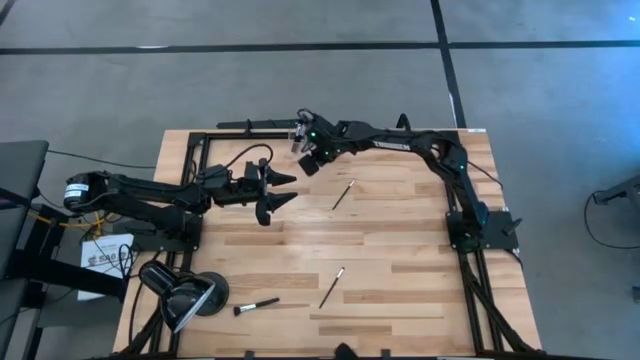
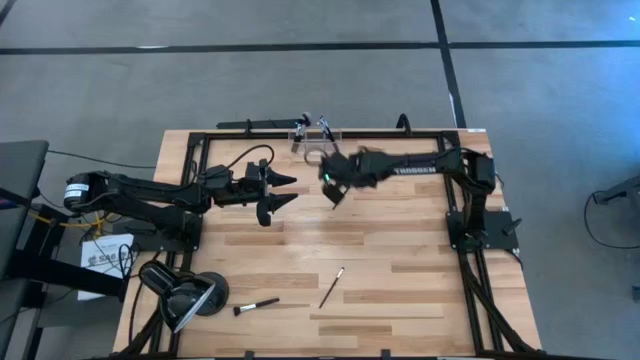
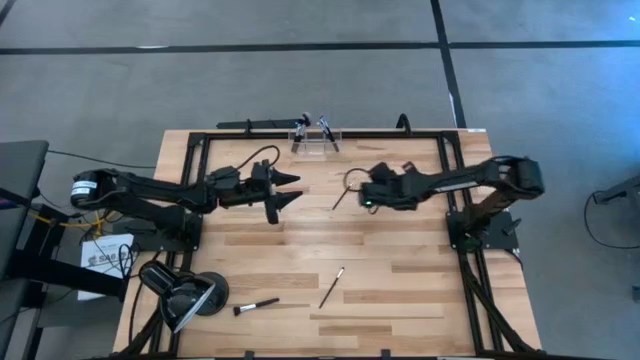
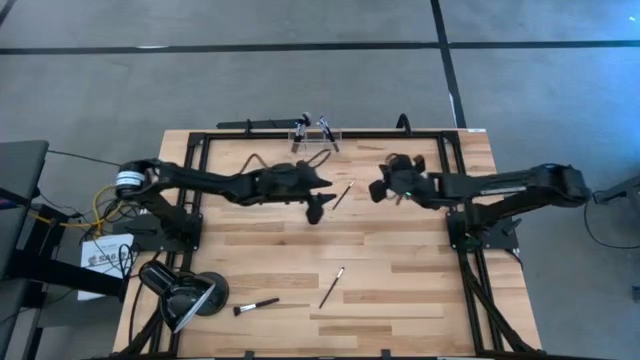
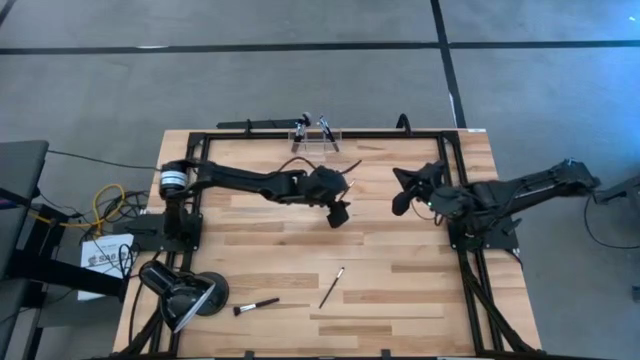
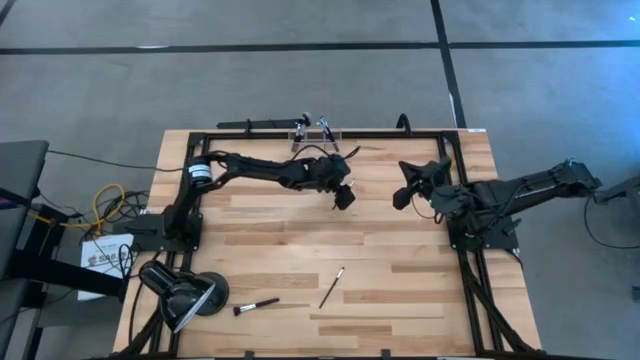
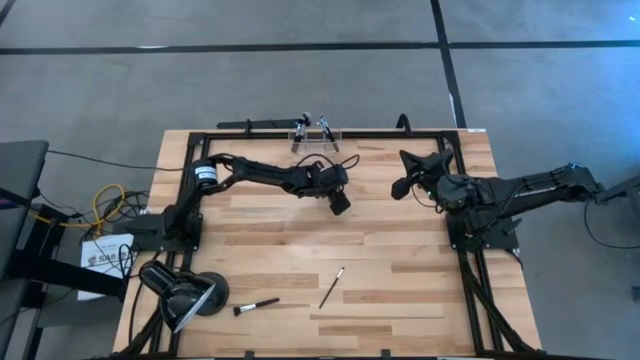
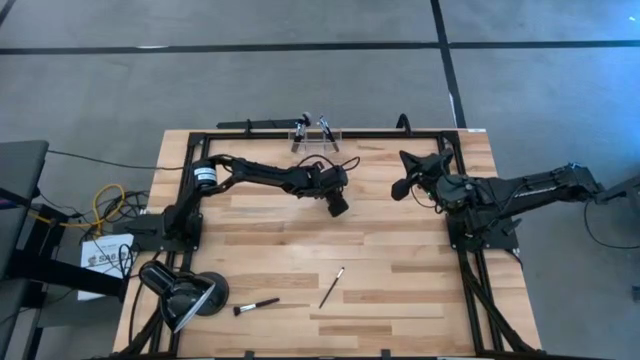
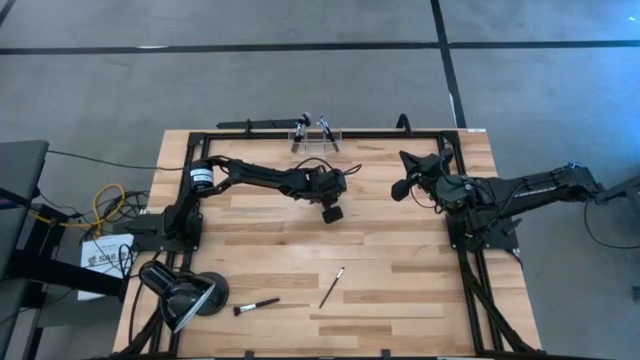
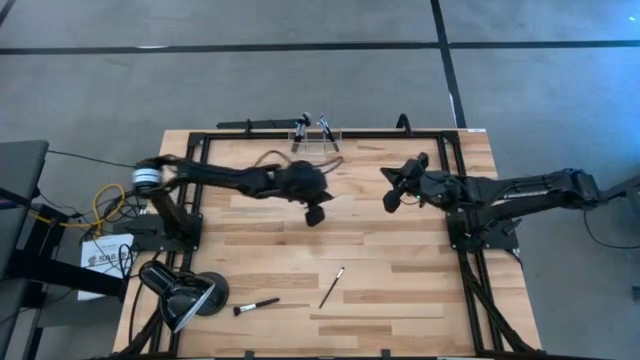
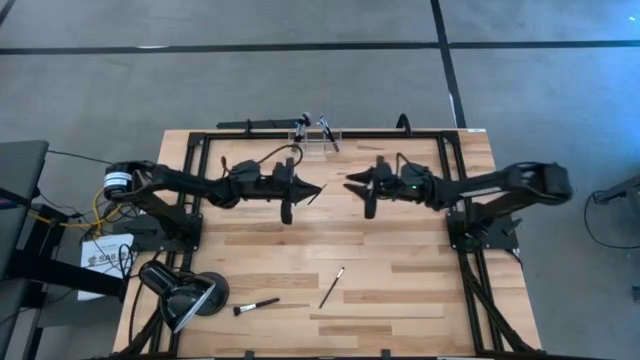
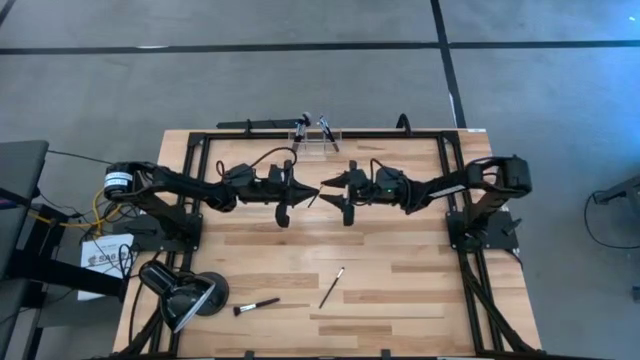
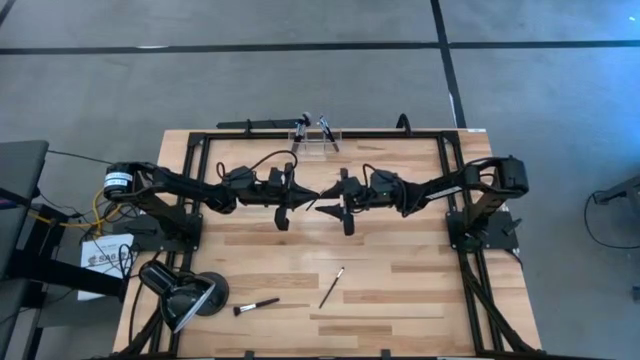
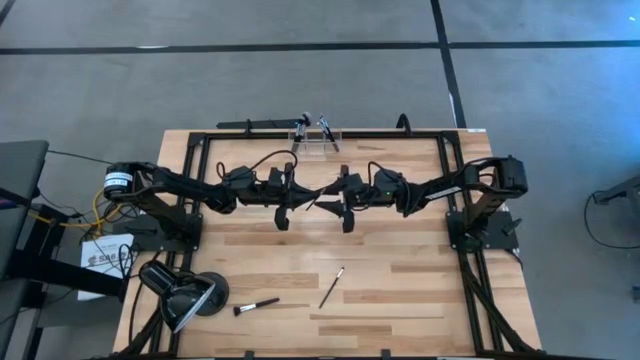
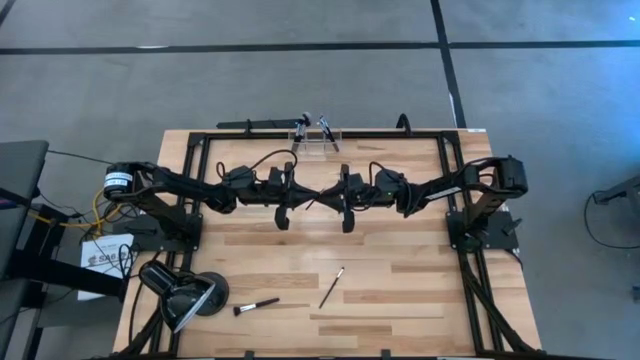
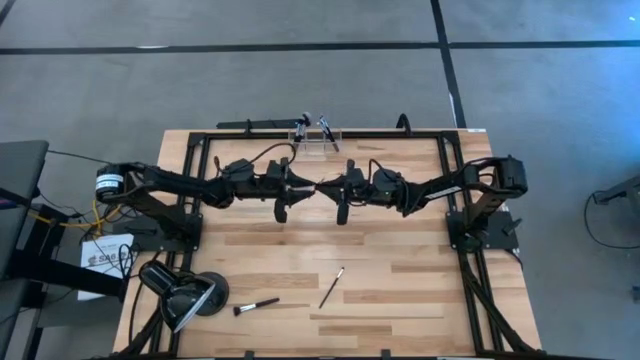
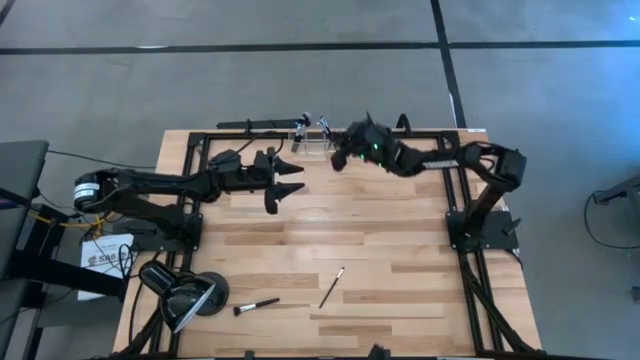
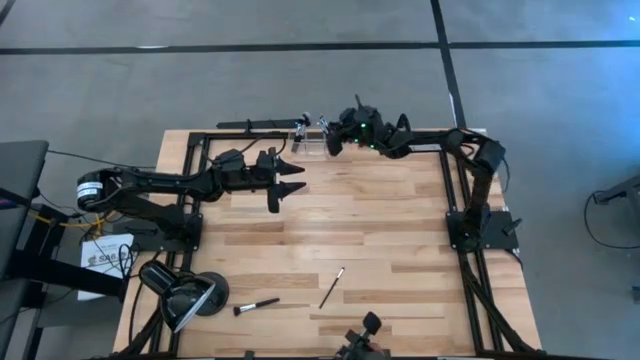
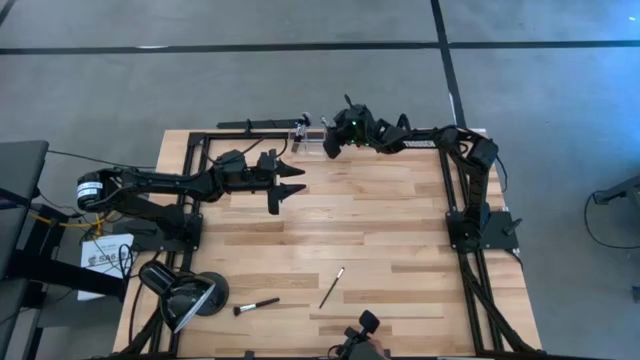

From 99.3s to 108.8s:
Task: Sort items
Put the liner brush into the right section of the transparent organizer

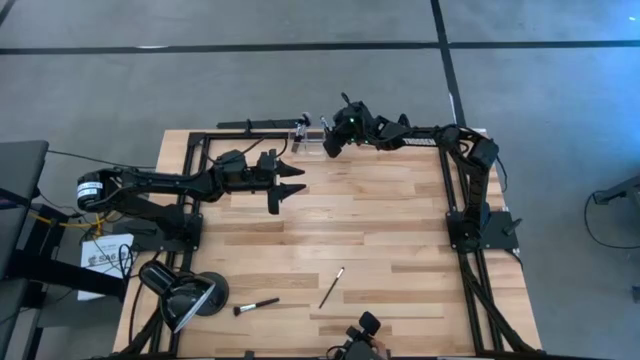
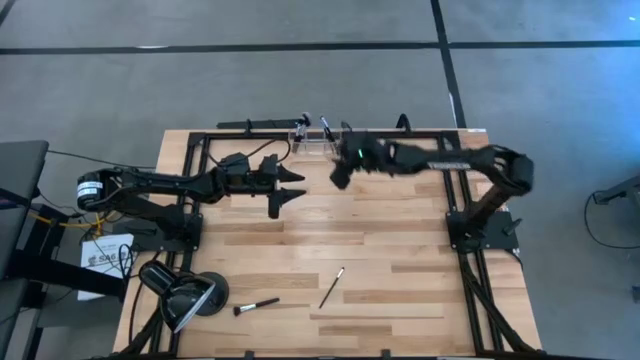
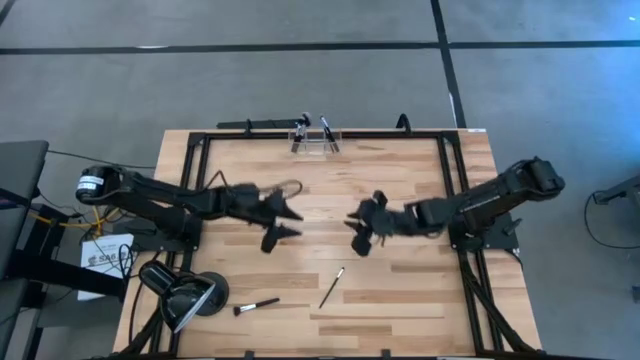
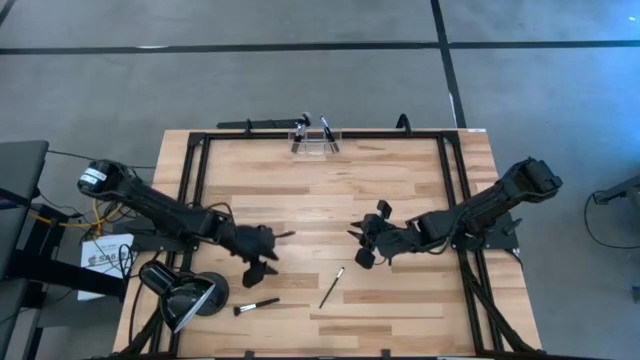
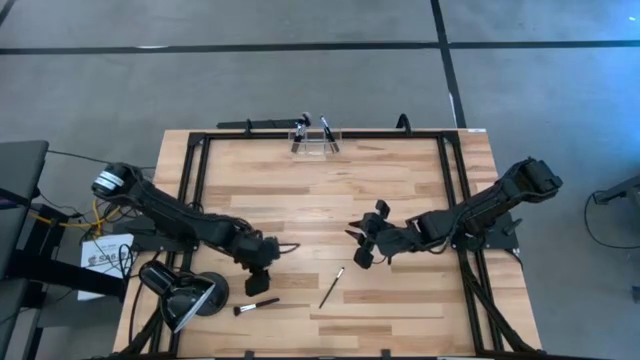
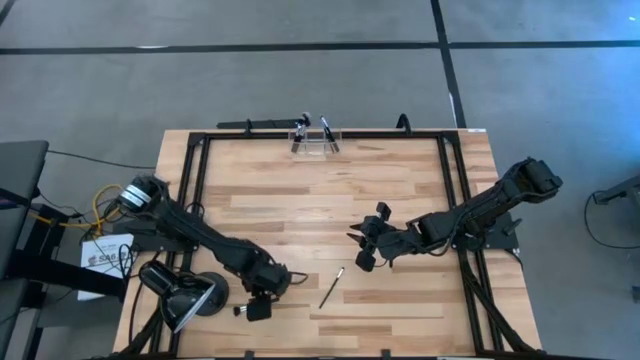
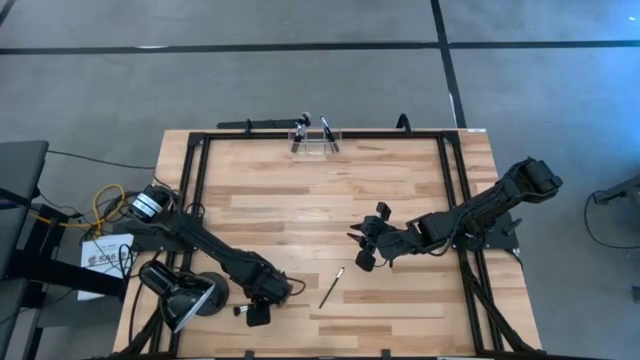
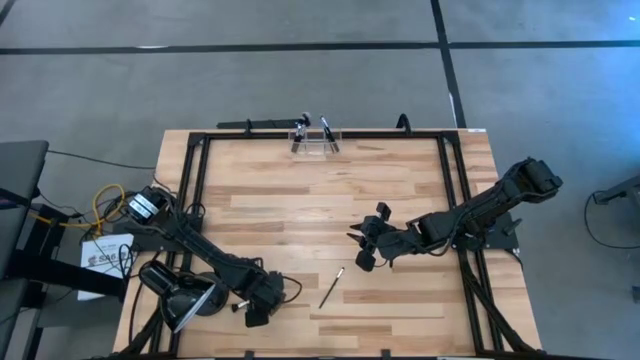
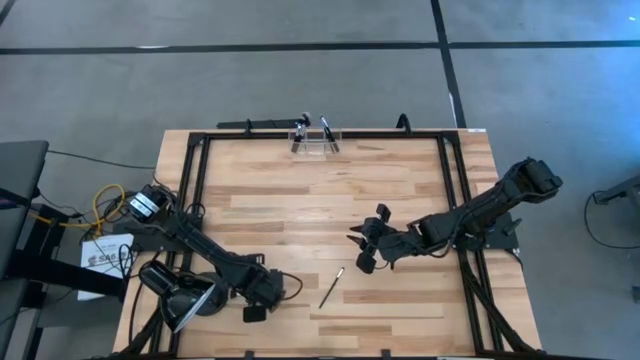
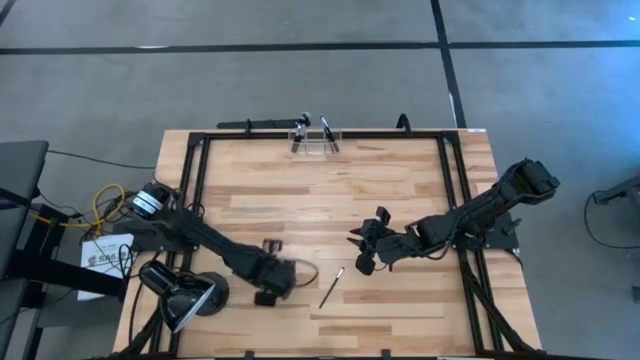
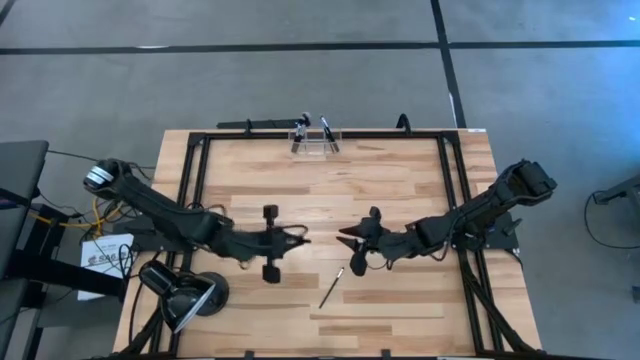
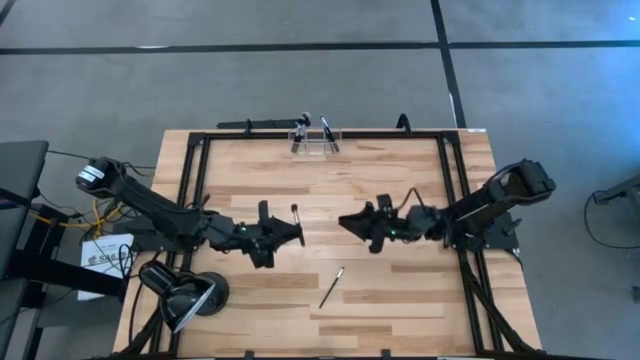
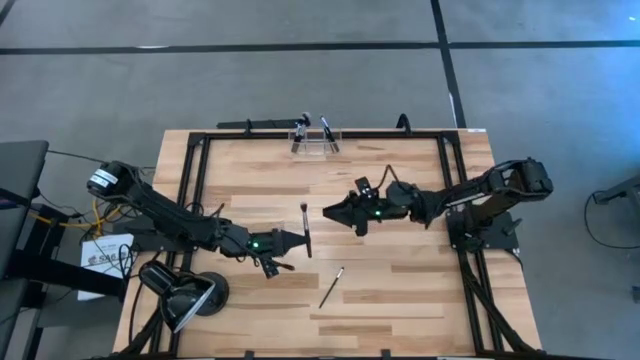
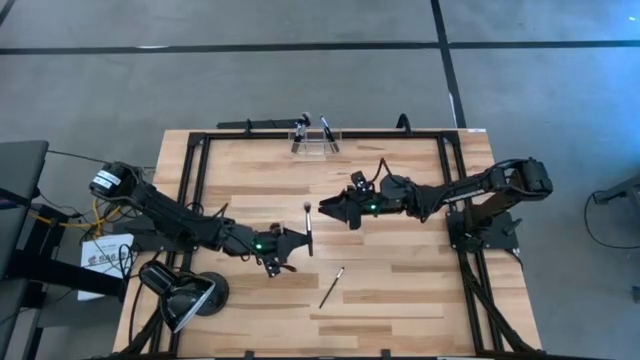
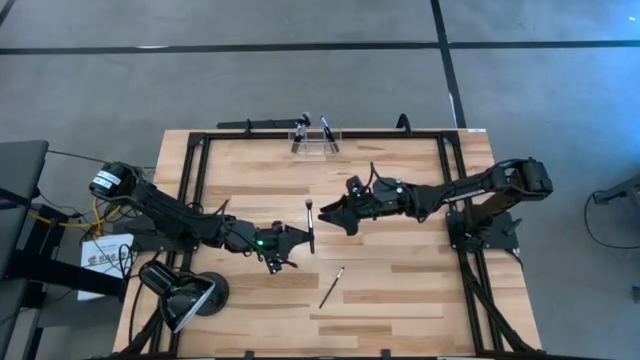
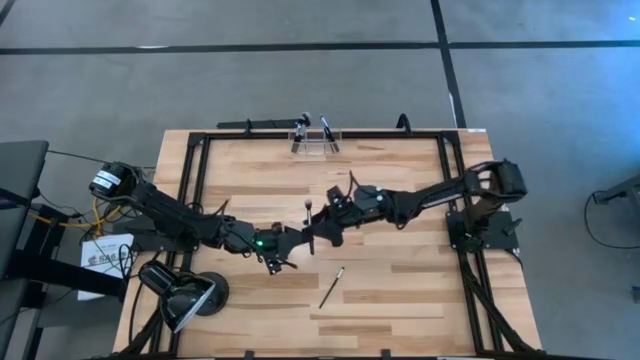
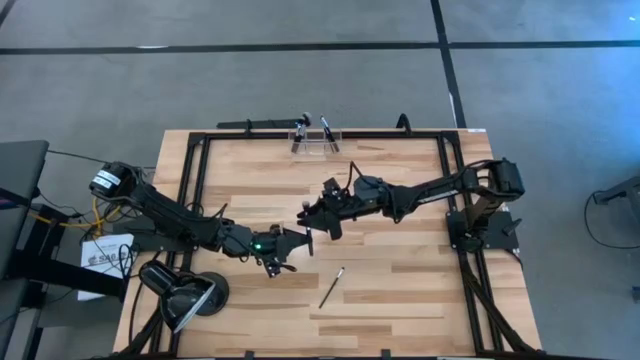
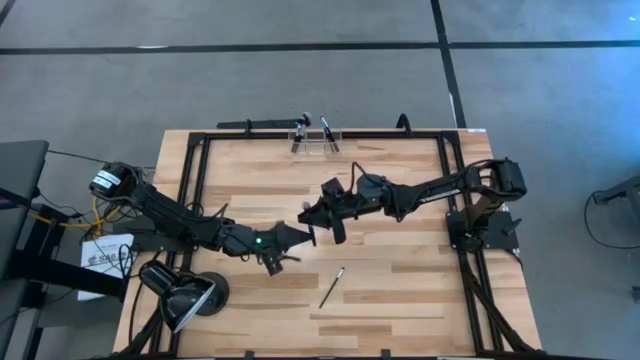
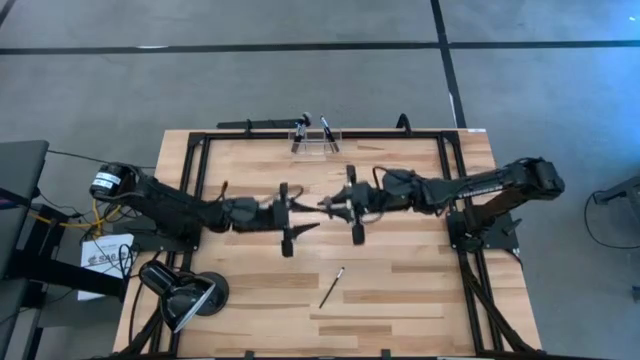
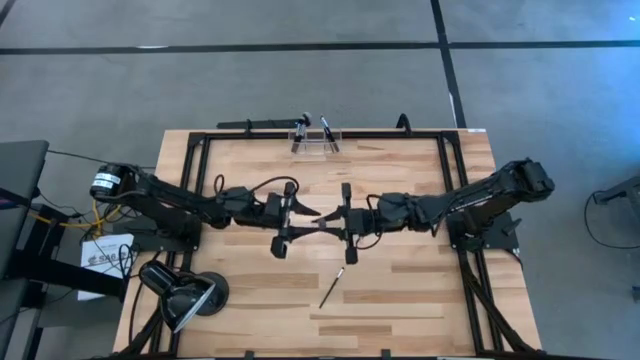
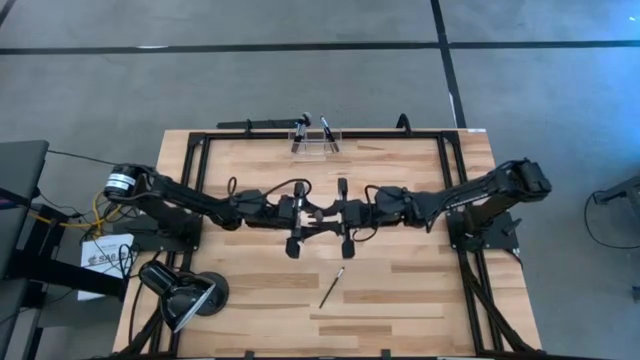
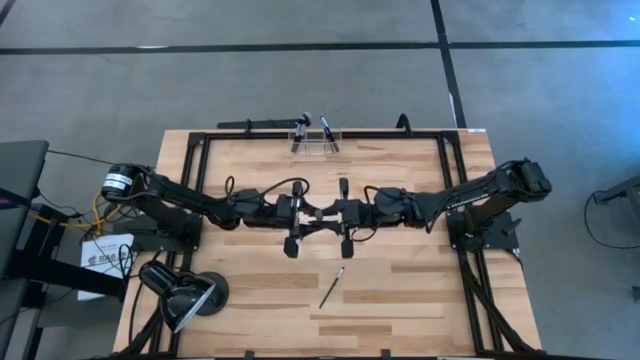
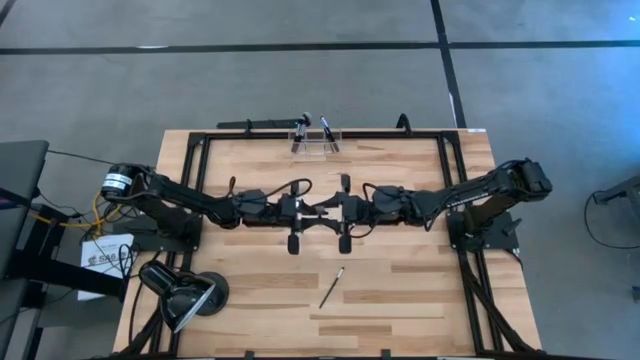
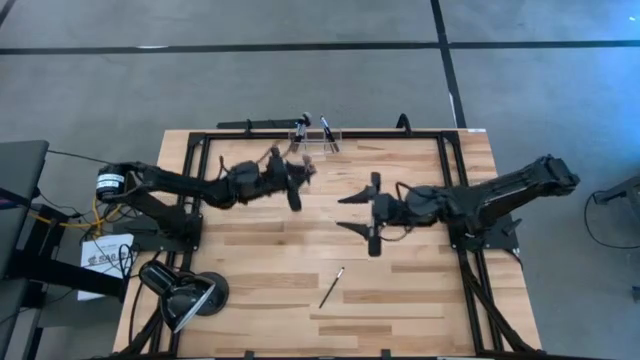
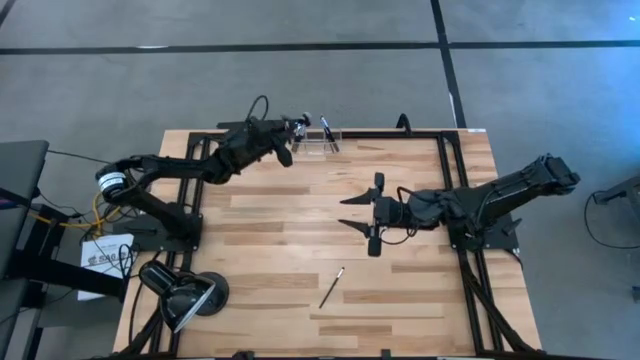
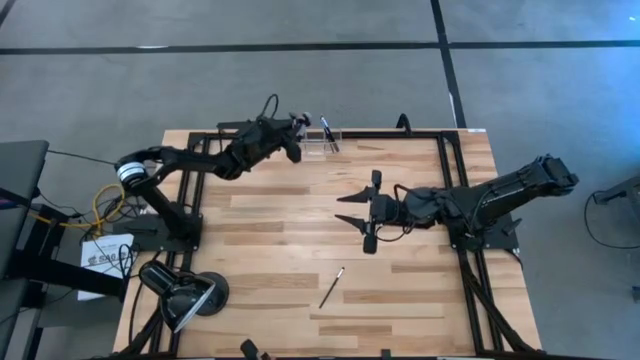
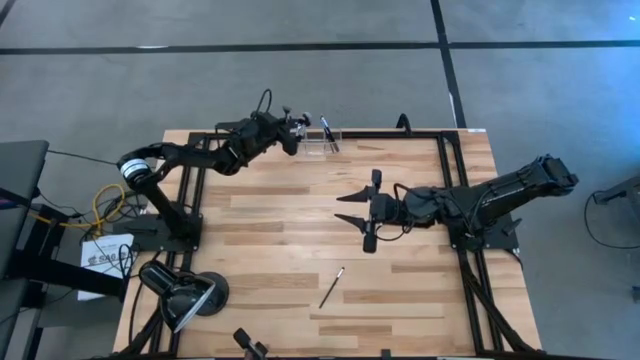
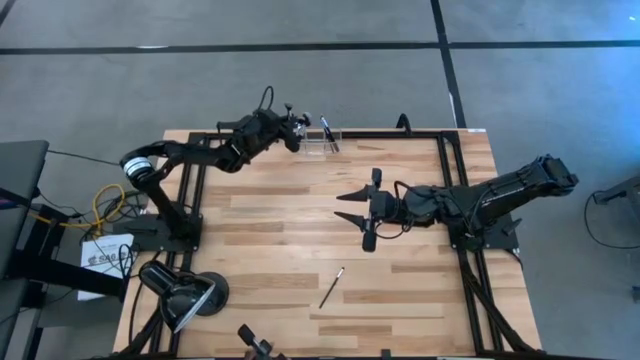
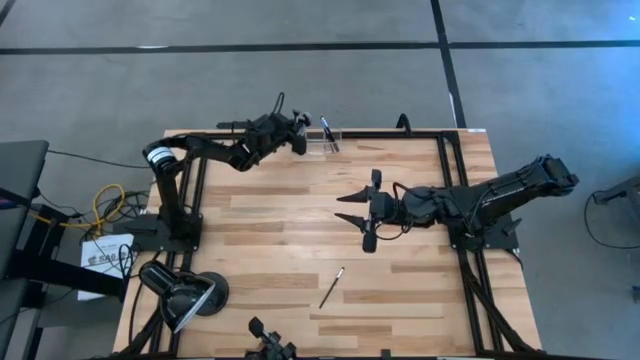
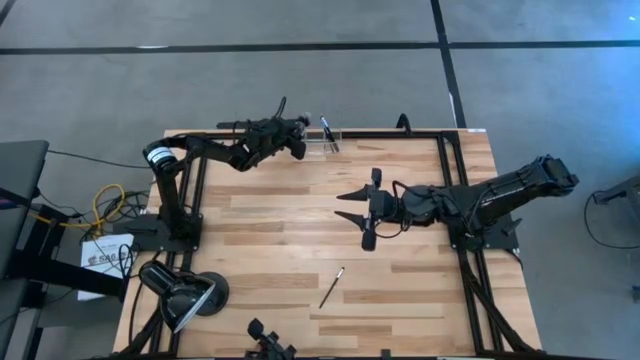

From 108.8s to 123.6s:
Put the powder brush into the left section of the transparent organizer
